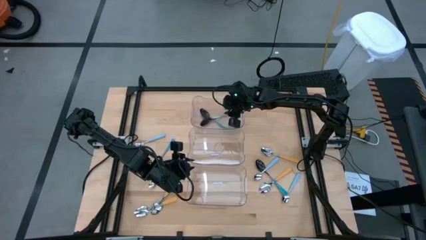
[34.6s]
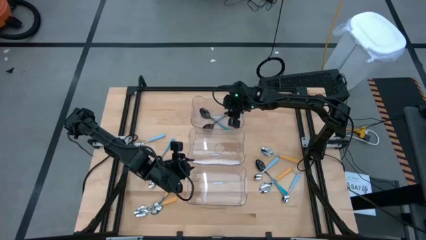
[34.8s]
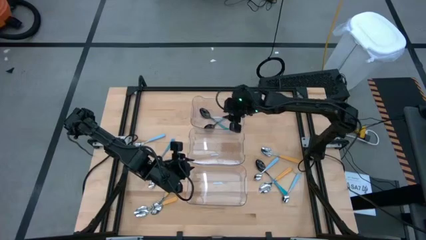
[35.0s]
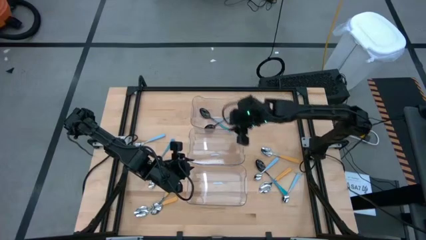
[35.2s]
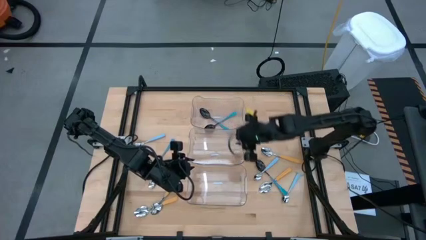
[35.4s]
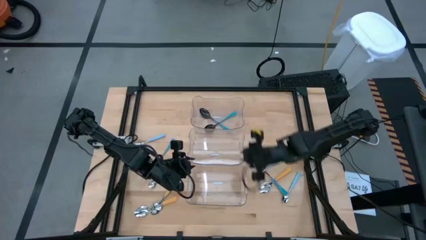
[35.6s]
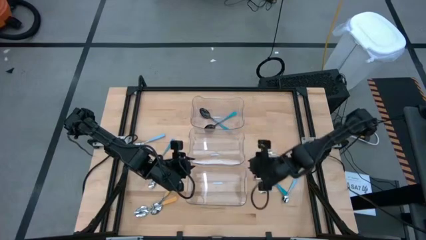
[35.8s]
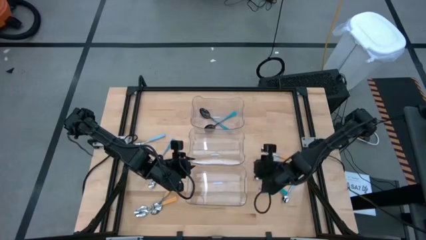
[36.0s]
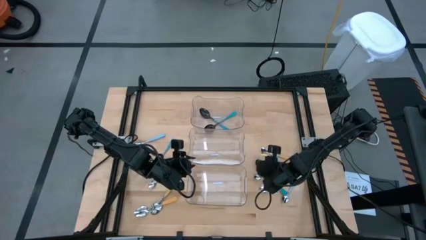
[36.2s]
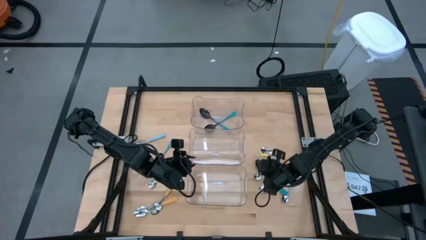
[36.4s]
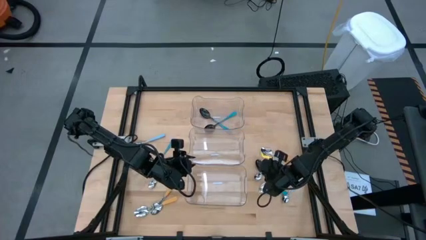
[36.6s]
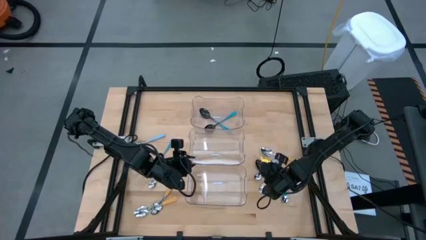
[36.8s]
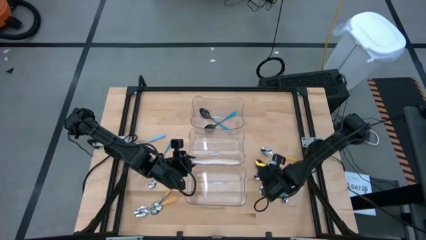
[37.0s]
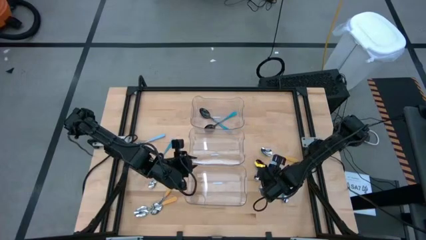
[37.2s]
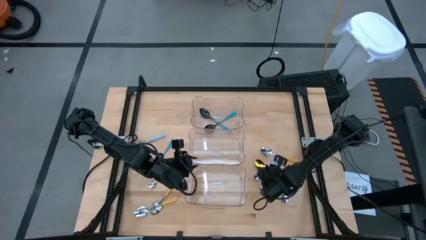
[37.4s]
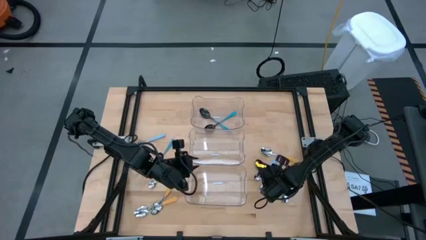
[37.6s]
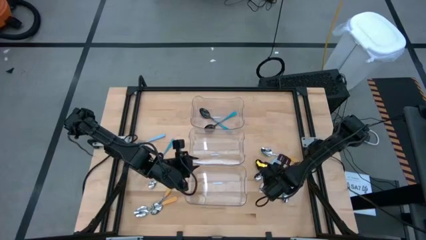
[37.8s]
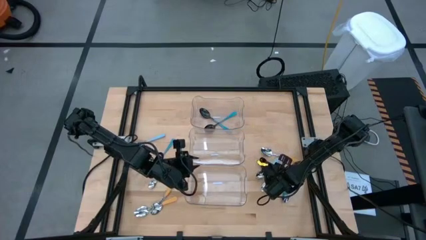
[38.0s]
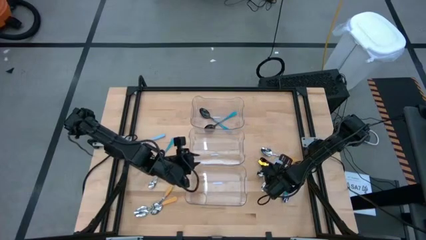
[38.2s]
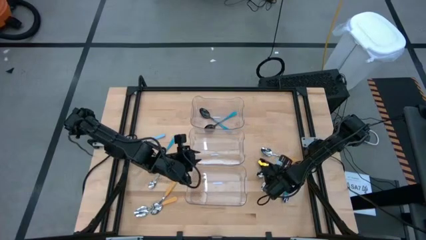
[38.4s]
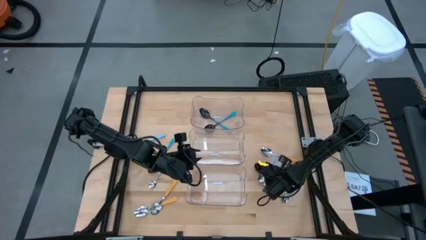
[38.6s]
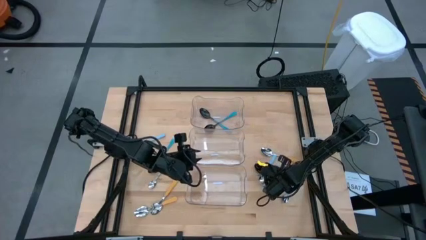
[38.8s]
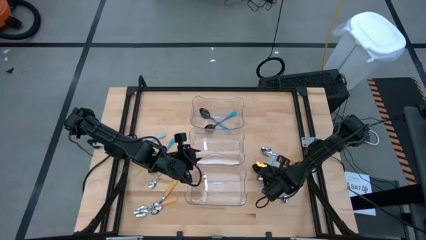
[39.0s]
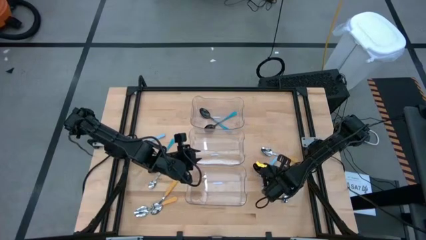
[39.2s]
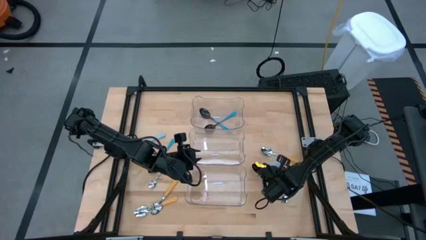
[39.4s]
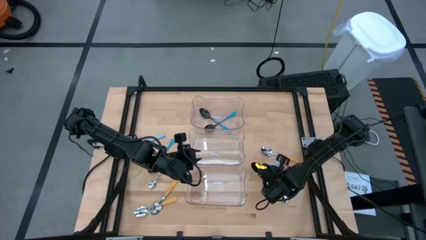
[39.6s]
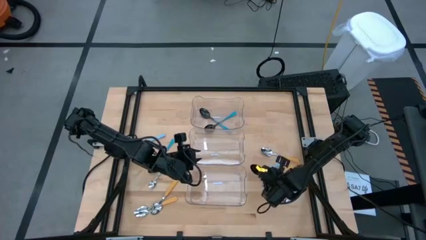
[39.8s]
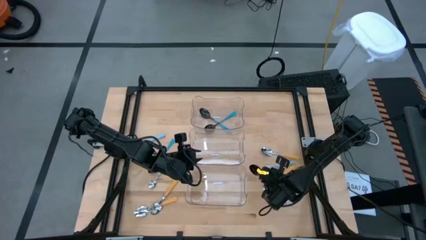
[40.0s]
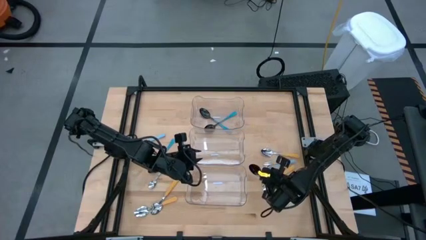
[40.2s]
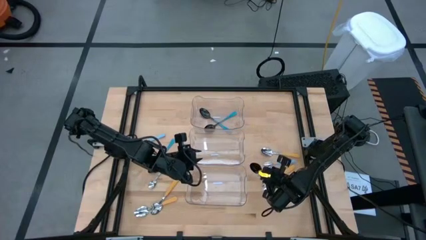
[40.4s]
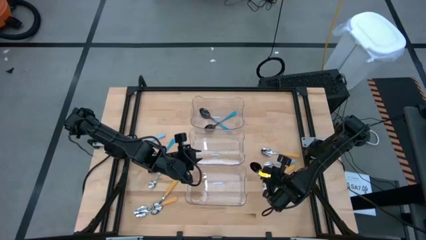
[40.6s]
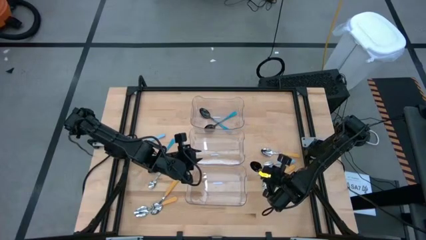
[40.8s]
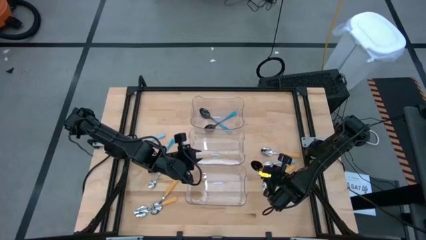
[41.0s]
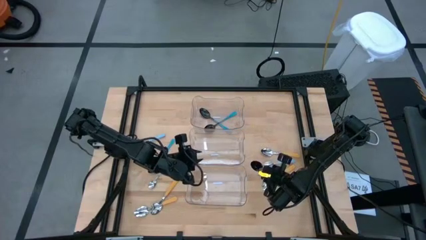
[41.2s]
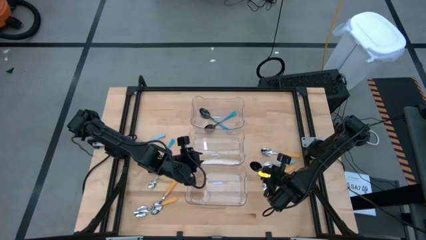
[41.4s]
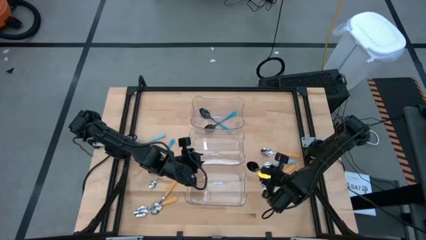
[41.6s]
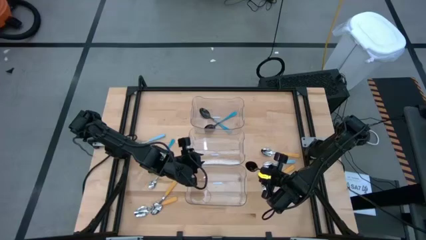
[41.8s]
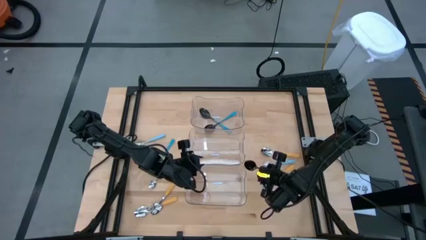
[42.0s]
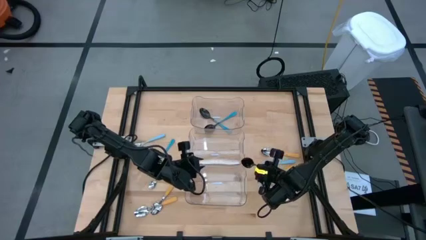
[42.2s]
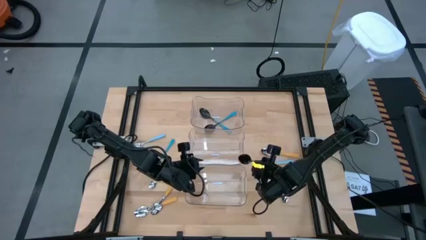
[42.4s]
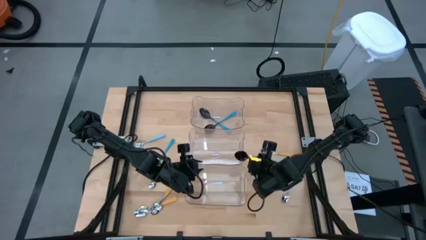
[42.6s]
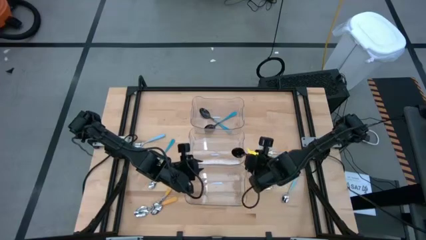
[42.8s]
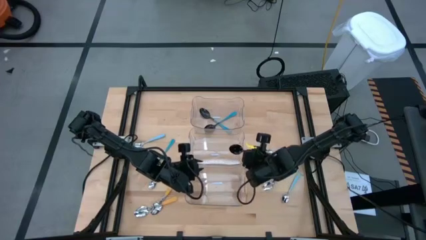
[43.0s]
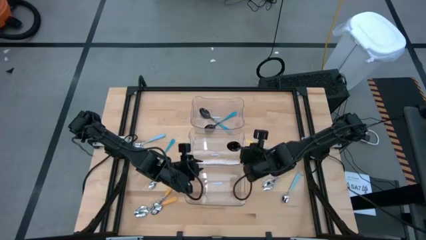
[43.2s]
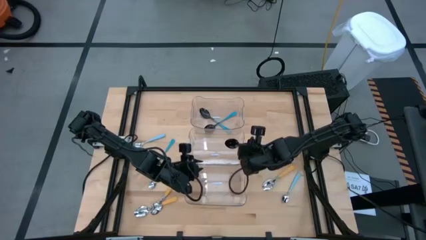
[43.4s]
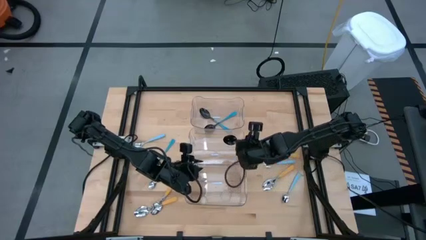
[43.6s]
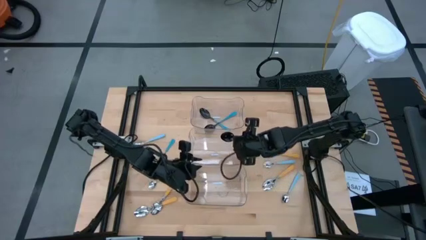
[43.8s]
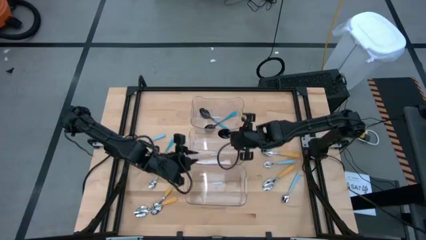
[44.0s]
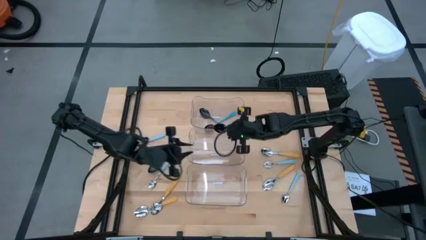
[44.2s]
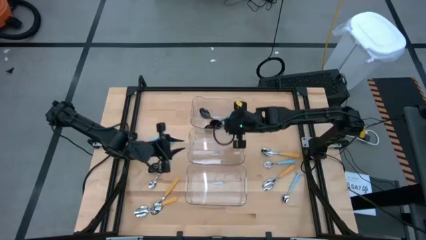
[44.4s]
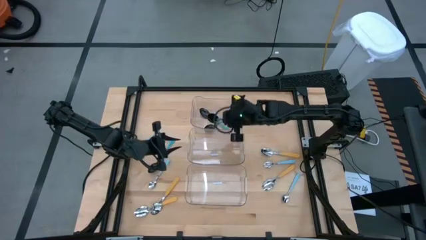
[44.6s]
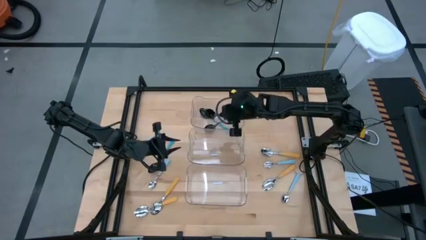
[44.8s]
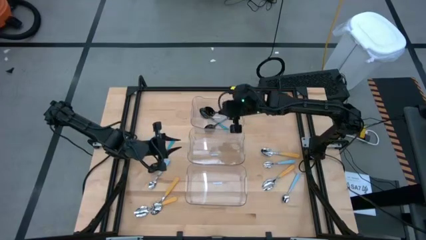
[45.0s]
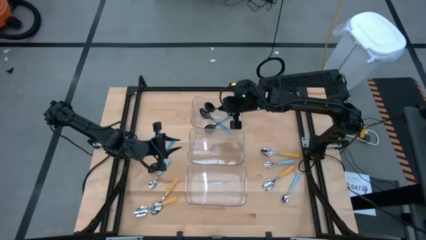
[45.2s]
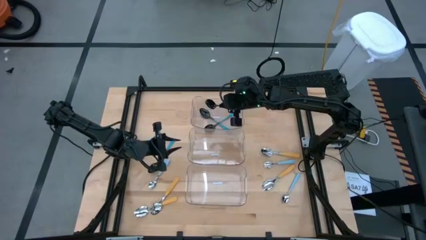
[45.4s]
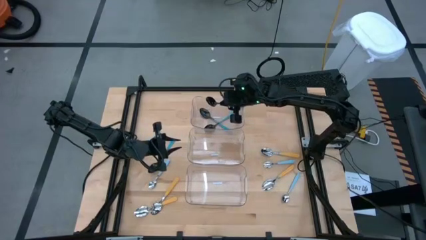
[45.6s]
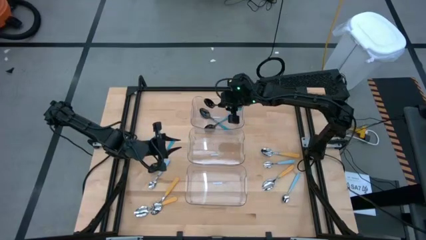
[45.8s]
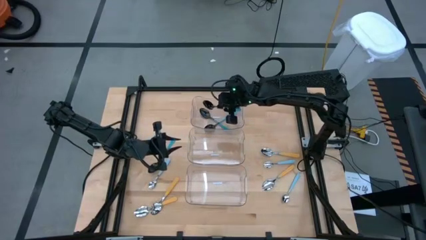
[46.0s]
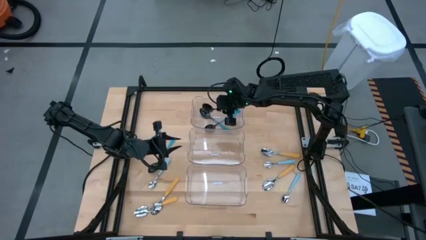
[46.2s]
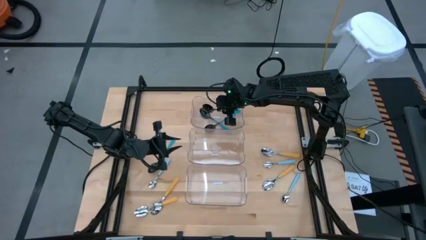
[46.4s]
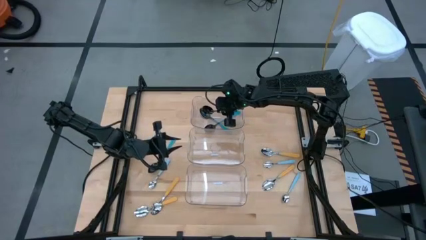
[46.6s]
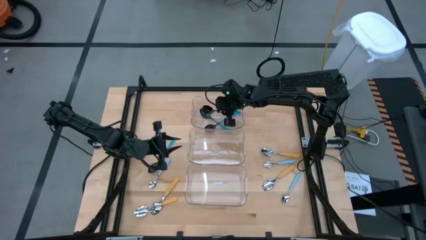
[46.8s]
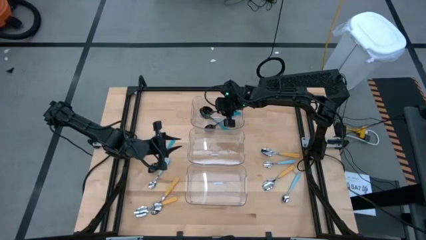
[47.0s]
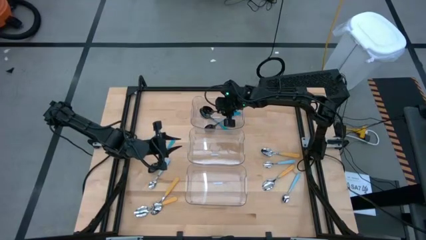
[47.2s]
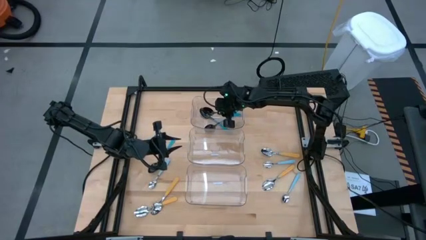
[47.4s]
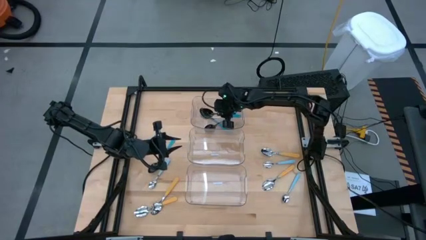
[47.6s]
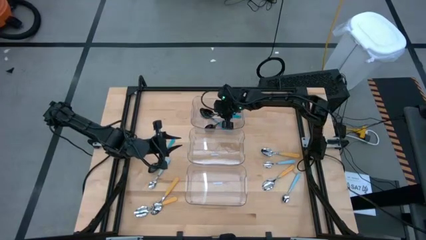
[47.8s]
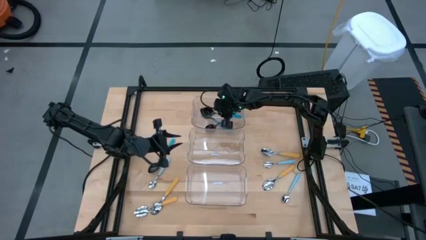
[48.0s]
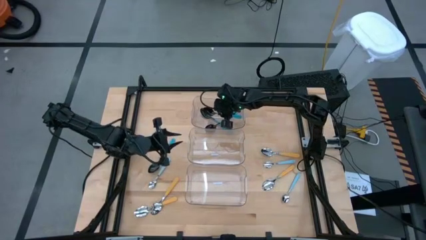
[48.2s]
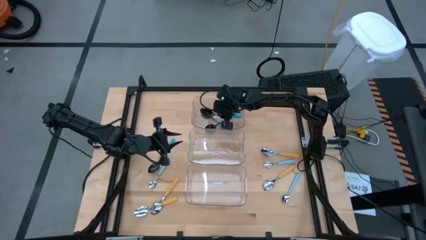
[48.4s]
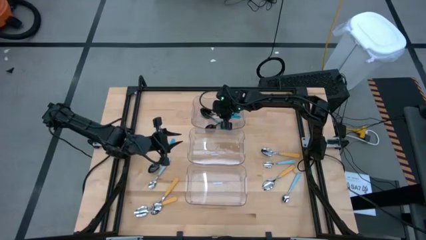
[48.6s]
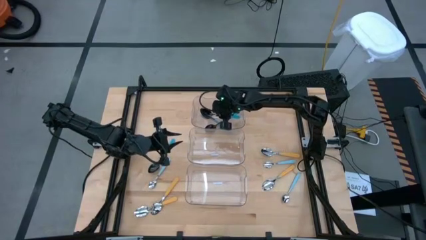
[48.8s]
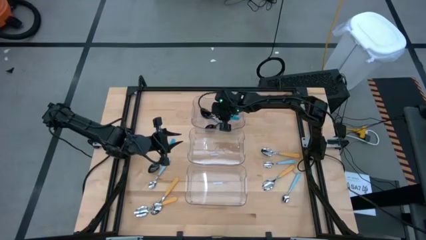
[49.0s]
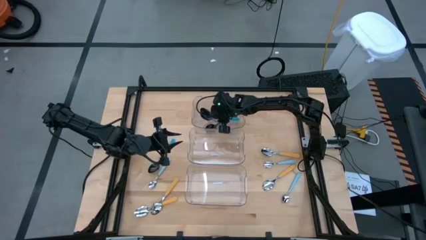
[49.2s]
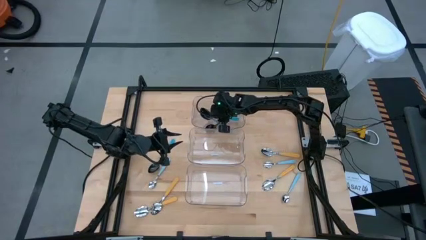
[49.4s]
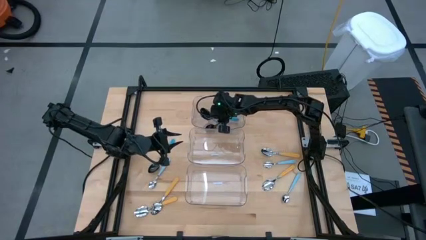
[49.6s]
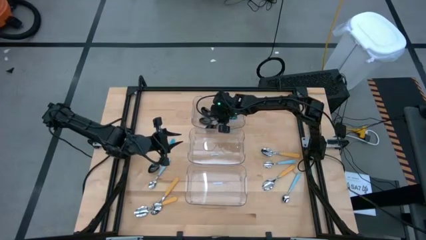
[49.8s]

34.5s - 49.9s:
Task: Sort silverware by color (type)
Put the dark blue spoon into the top transparent bin
